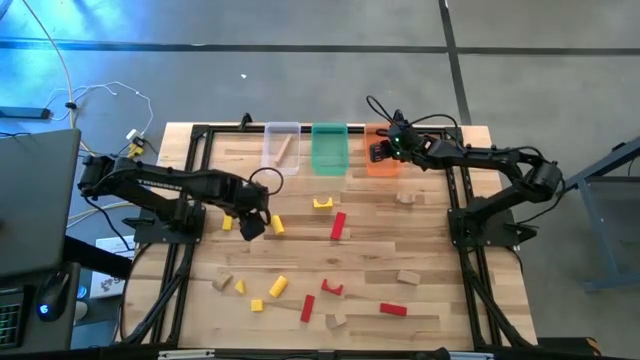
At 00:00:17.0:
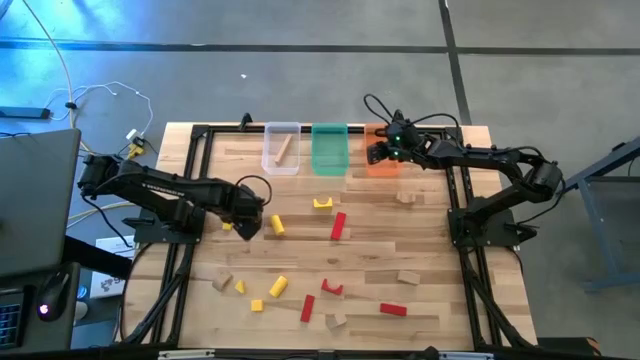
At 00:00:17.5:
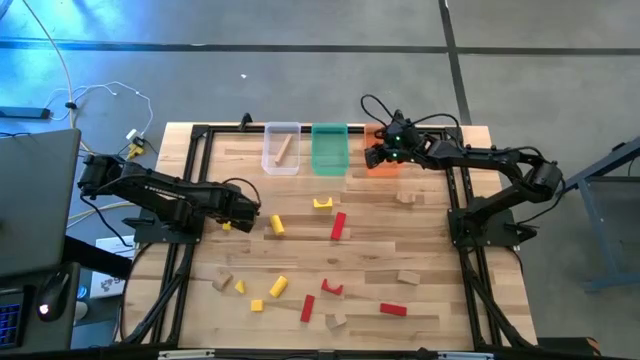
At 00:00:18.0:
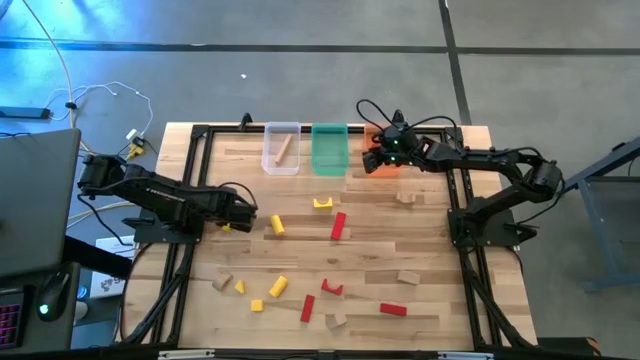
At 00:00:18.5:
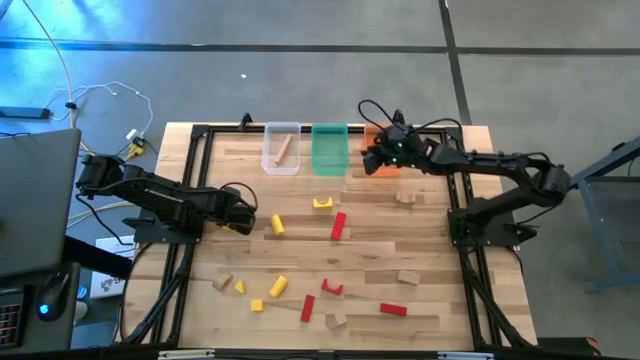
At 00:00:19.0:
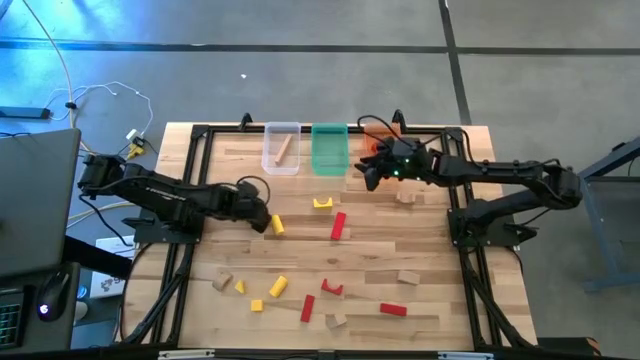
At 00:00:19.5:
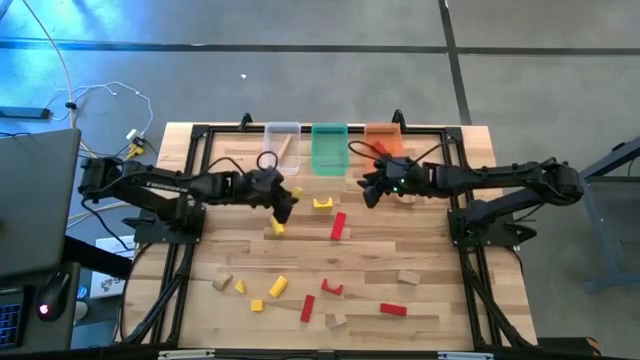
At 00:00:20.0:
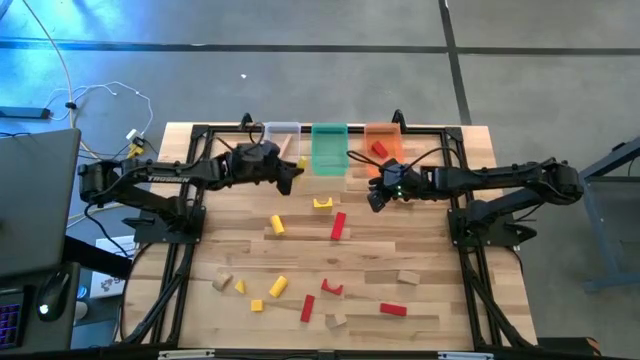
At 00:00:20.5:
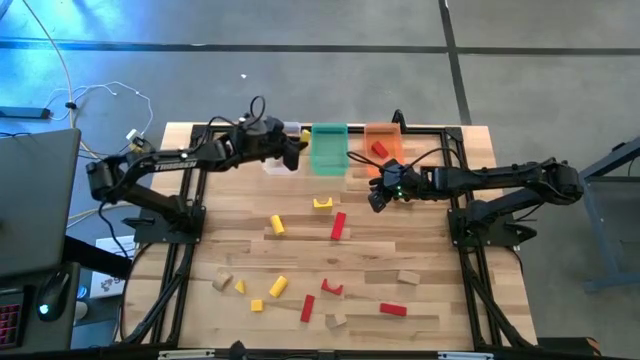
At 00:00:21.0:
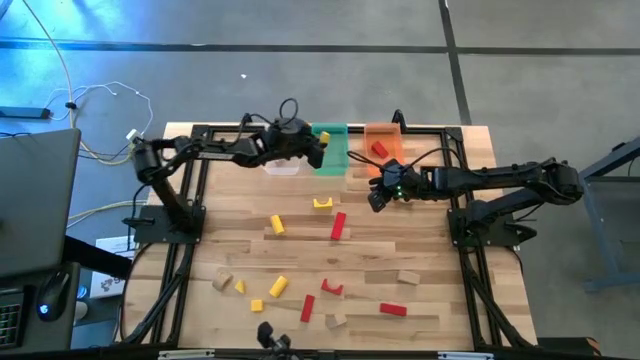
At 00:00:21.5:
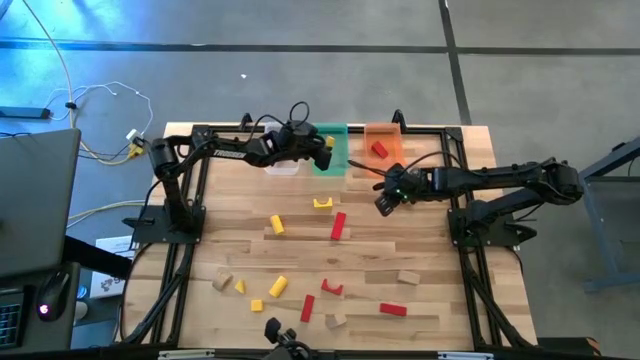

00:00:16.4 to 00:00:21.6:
Task: Sort & place blocks by color
Put the yellow block into the green transparent bin

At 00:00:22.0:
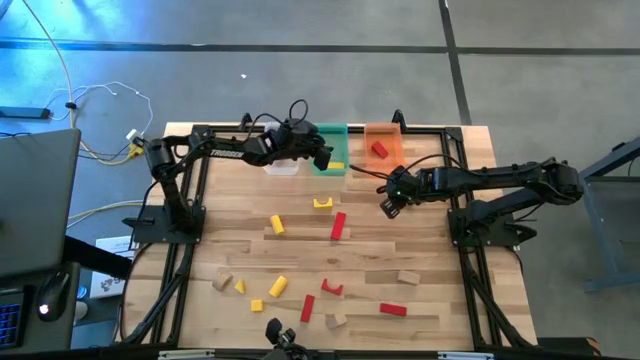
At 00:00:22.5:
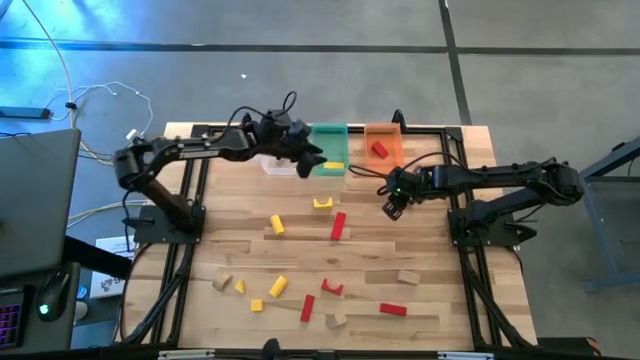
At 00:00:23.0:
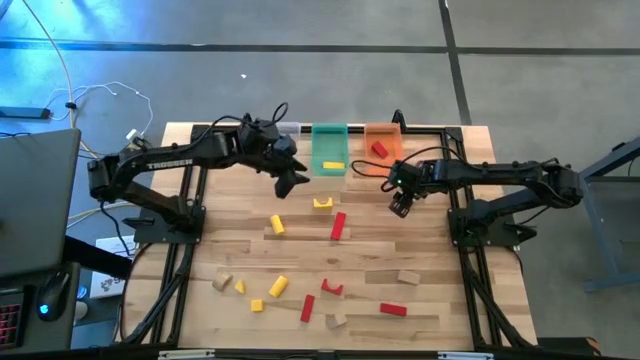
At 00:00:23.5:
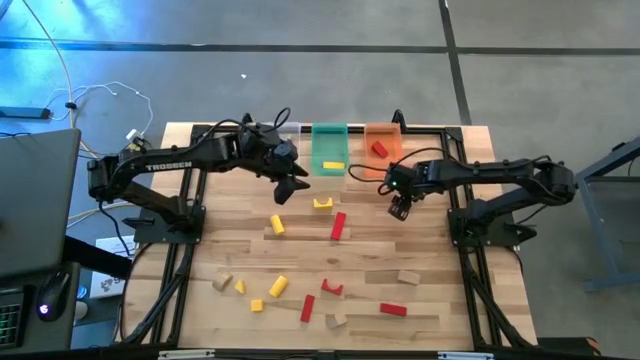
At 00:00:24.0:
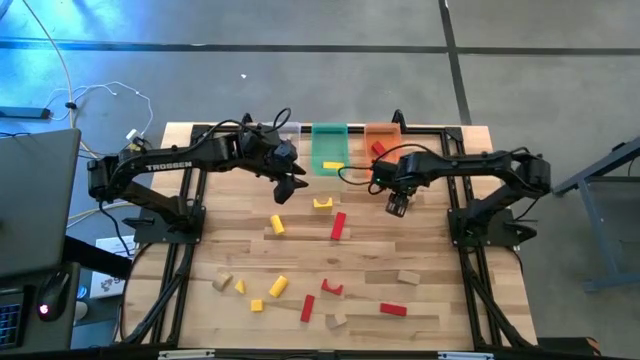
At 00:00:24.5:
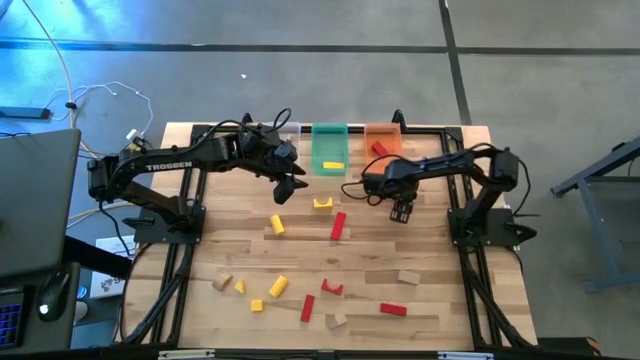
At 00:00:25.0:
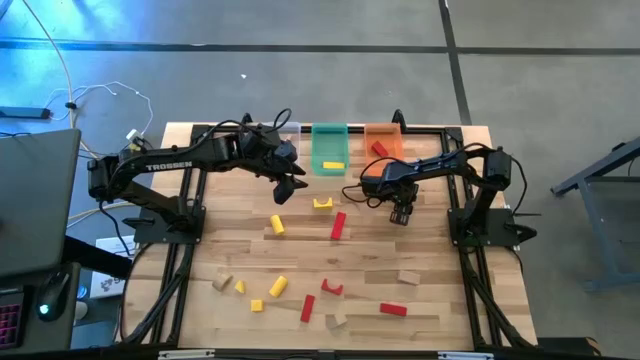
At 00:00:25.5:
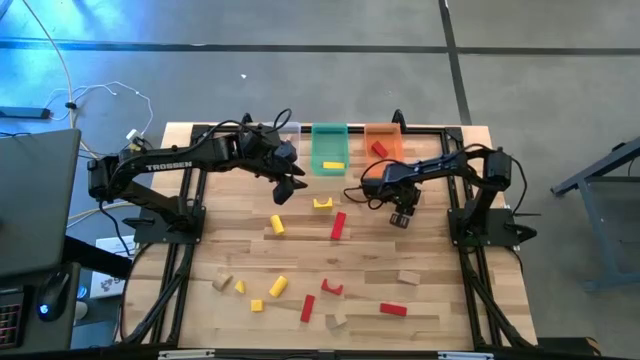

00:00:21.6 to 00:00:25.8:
Put the brown block into the white transparent bin

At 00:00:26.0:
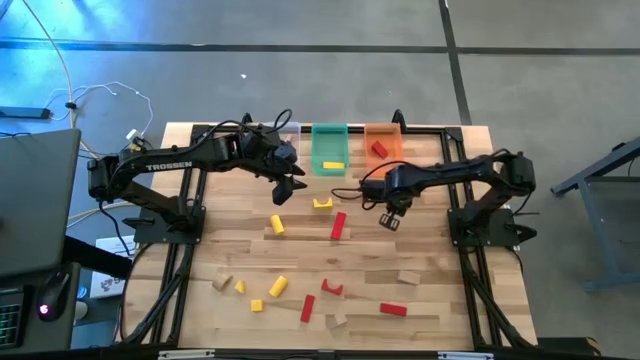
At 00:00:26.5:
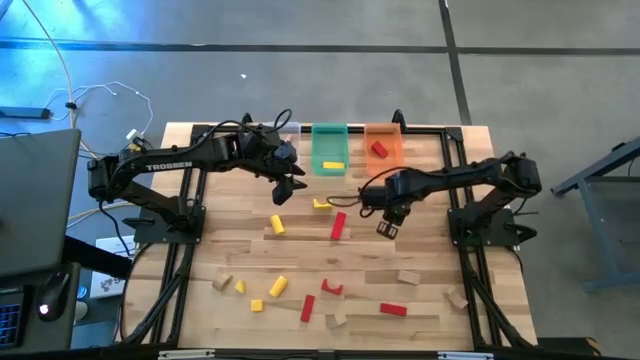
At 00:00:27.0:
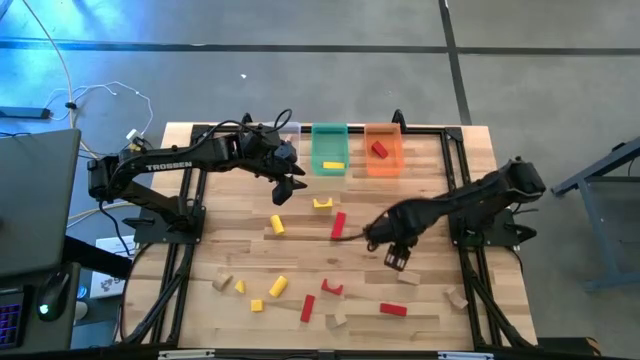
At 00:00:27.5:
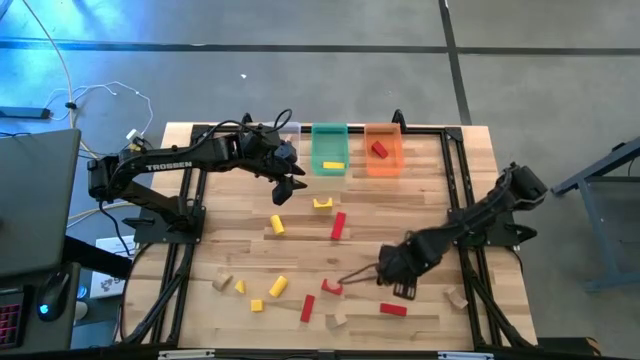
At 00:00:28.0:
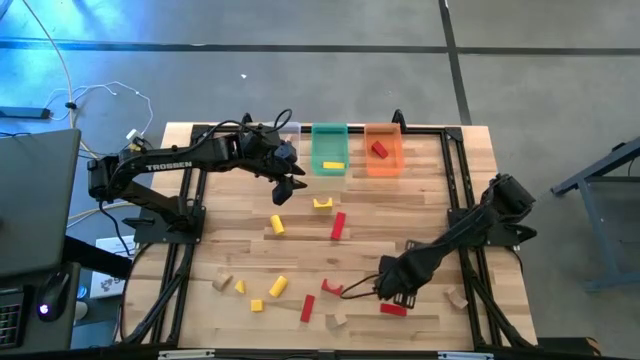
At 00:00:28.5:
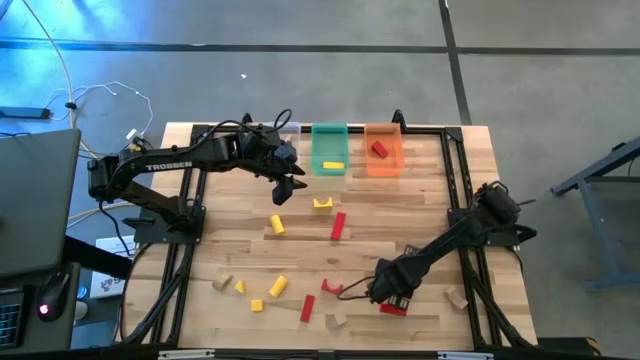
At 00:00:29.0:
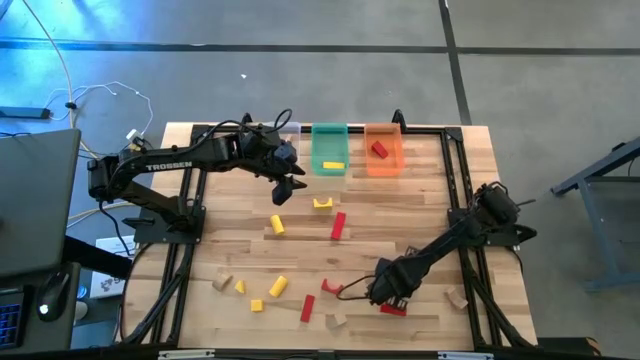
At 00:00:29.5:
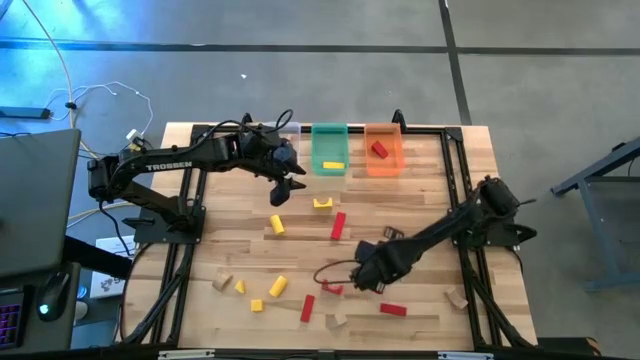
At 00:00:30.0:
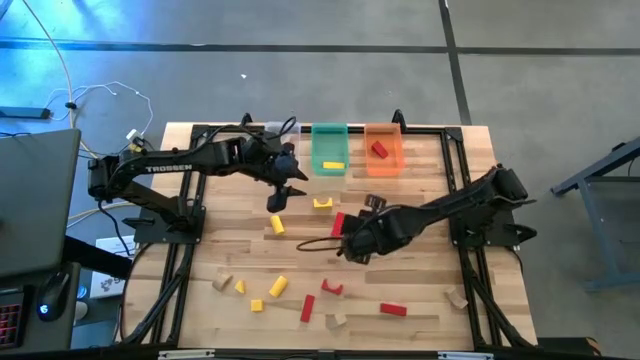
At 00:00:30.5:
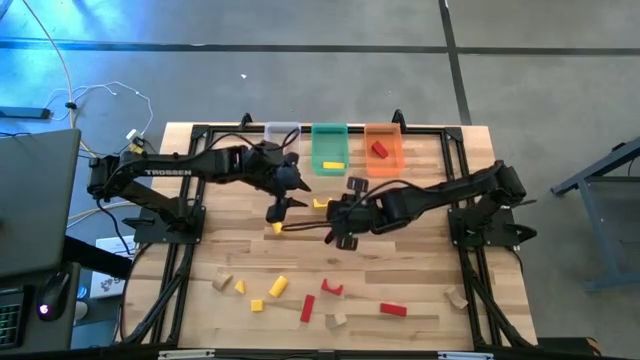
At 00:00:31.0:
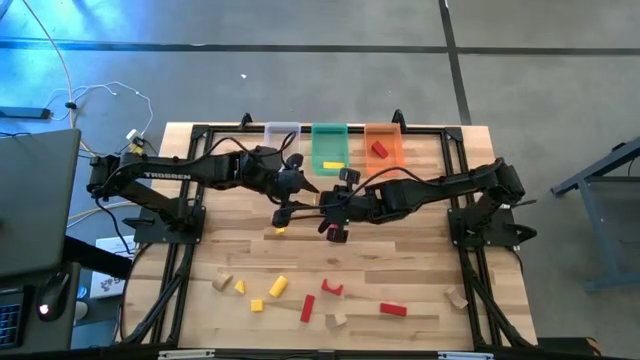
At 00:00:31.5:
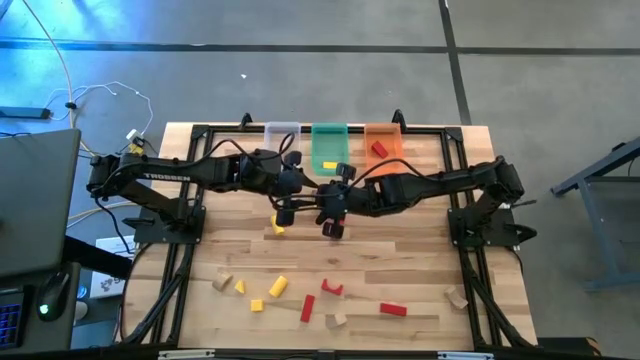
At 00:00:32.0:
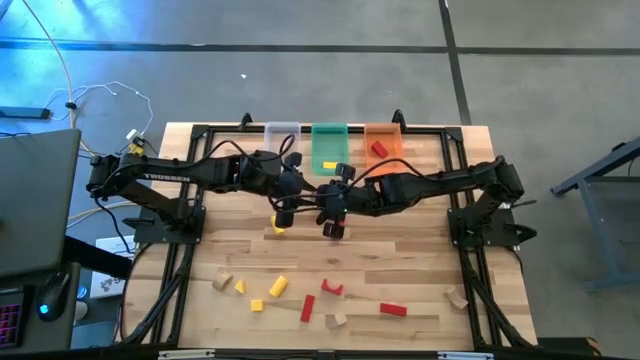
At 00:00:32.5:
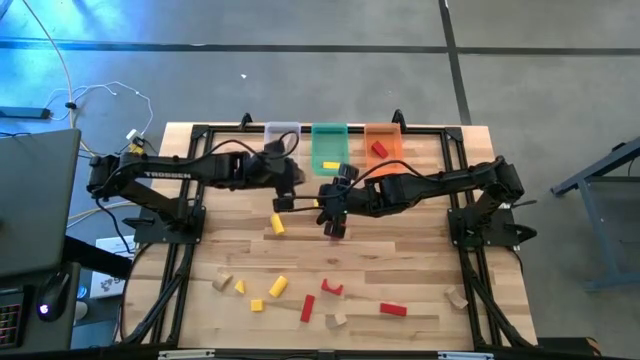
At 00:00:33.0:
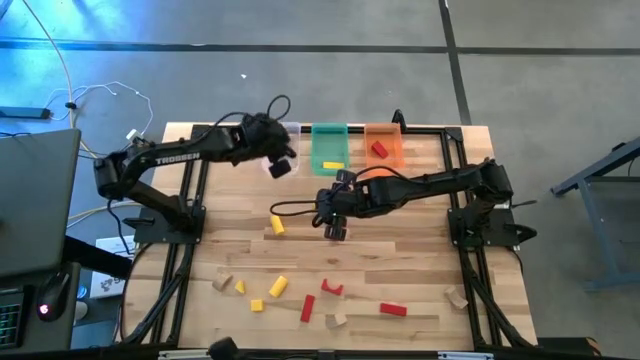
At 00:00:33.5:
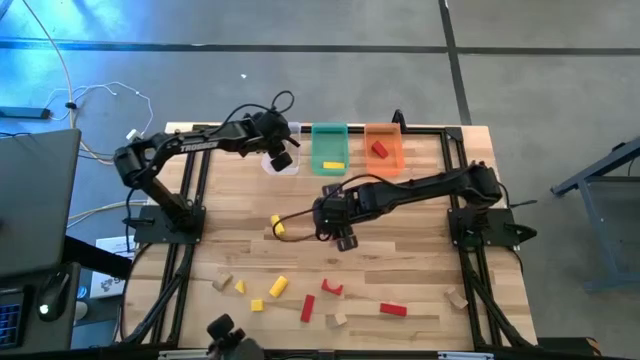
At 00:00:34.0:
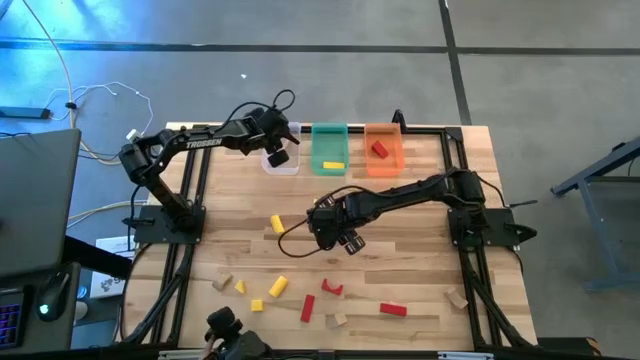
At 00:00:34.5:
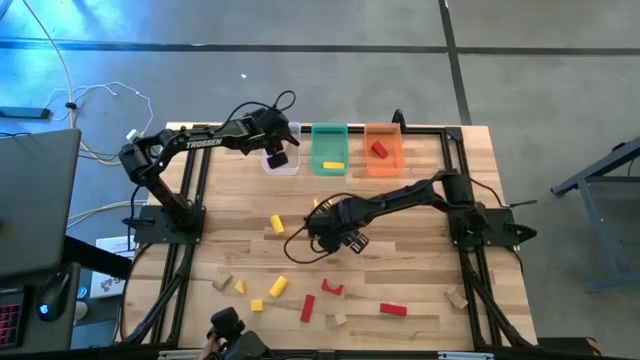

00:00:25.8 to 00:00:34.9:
Put the brown block into the white transparent bin

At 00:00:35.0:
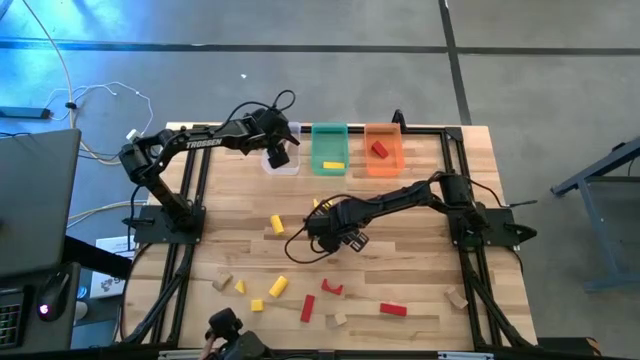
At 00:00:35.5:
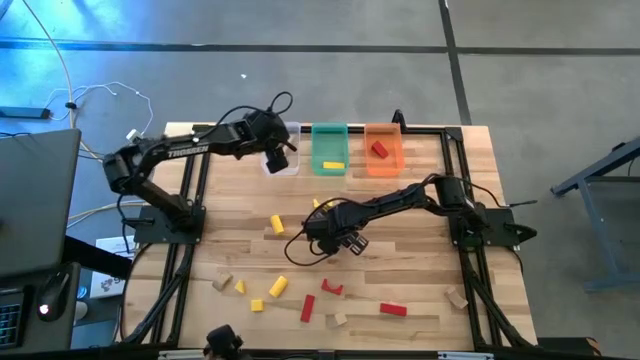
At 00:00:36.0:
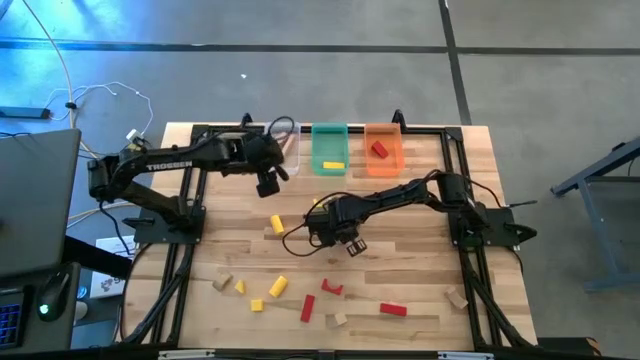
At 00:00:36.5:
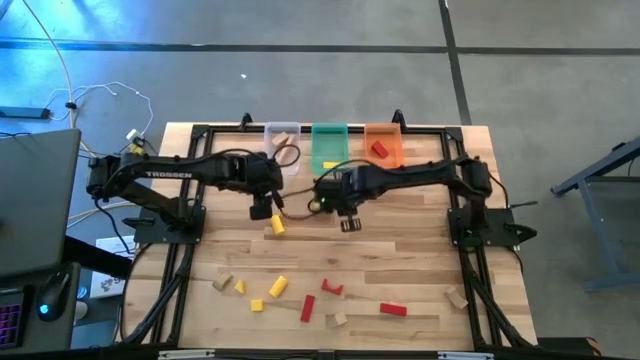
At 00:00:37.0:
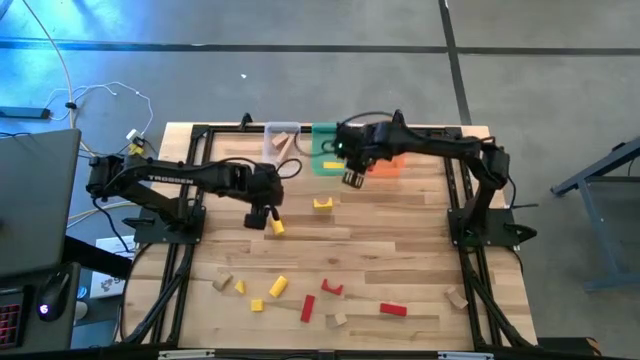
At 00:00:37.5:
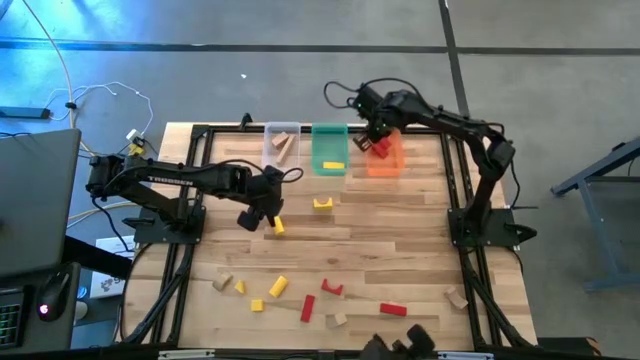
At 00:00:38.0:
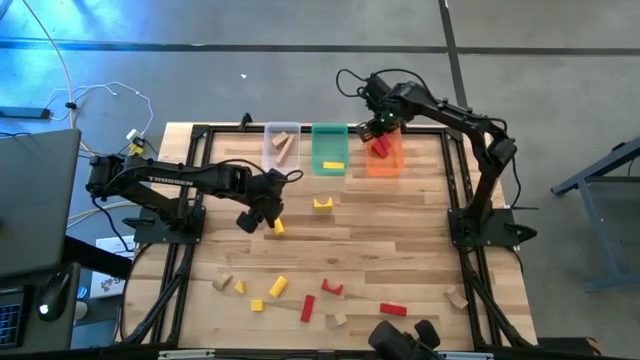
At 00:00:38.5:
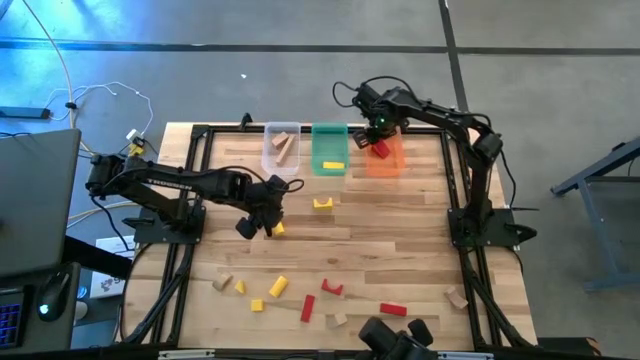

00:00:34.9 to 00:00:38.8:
Put the red block into the orange transparent bin
